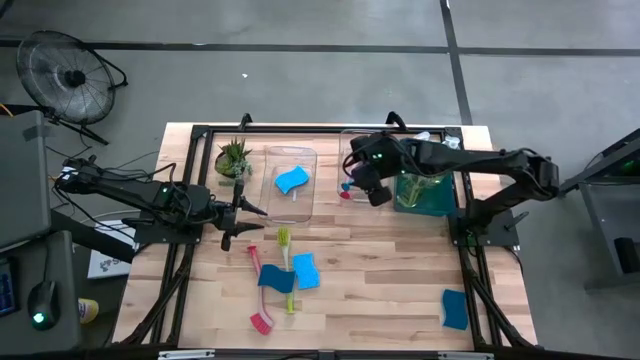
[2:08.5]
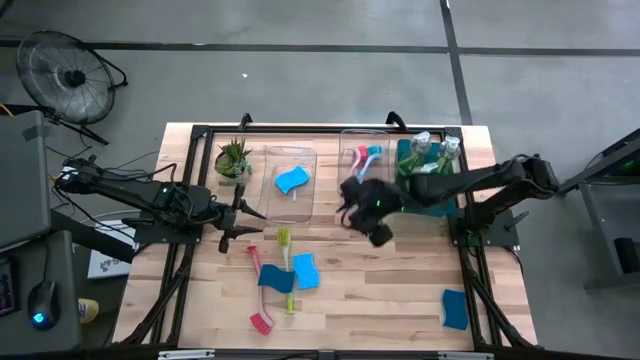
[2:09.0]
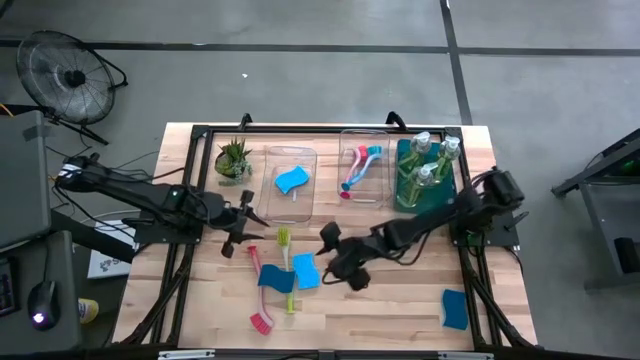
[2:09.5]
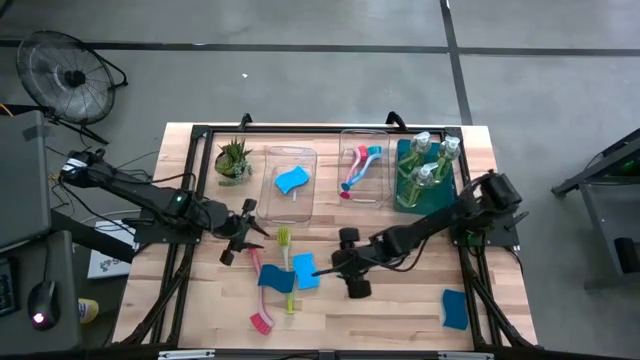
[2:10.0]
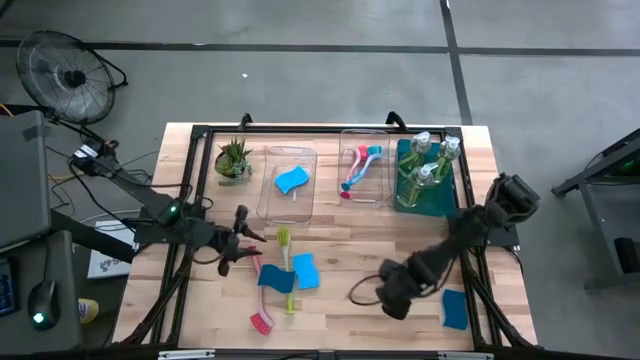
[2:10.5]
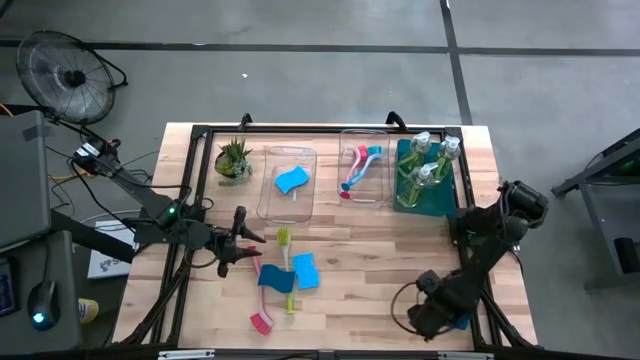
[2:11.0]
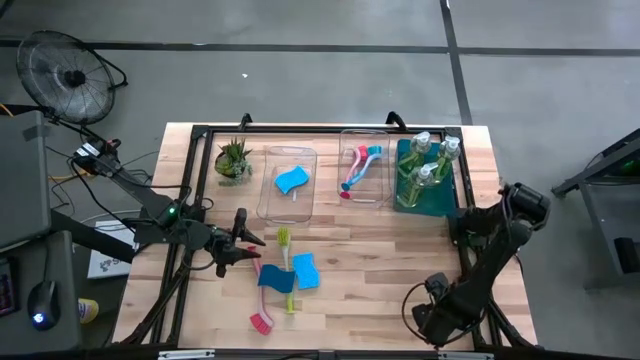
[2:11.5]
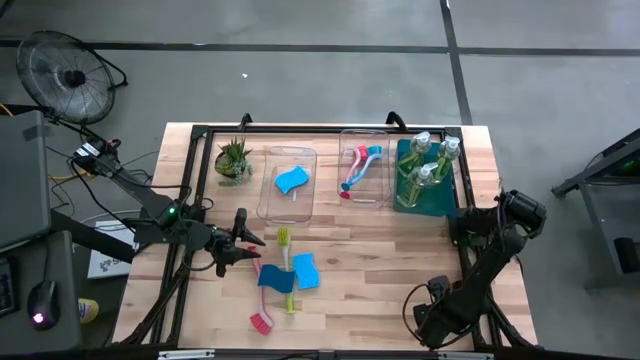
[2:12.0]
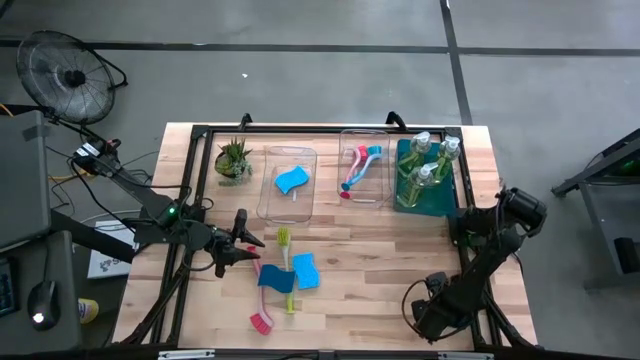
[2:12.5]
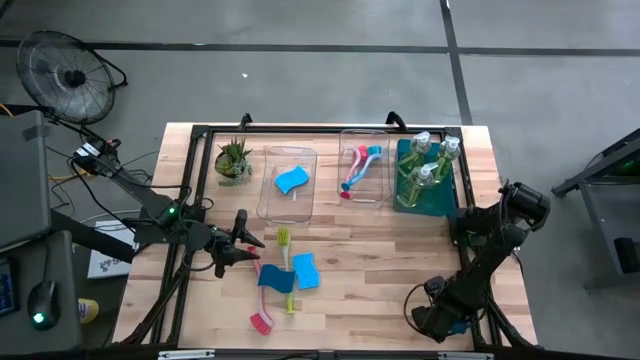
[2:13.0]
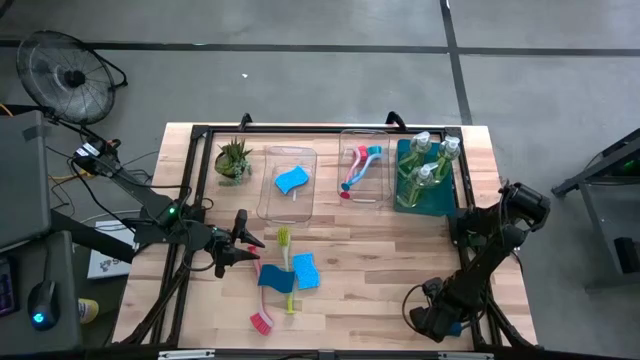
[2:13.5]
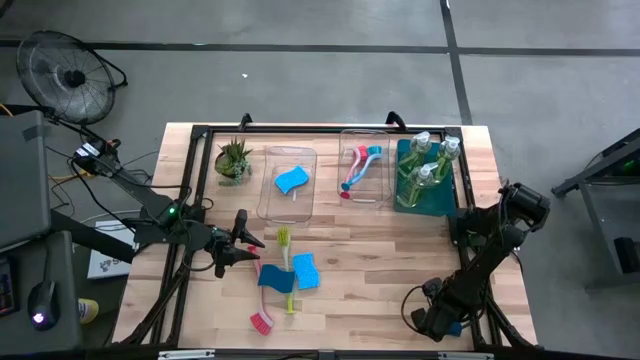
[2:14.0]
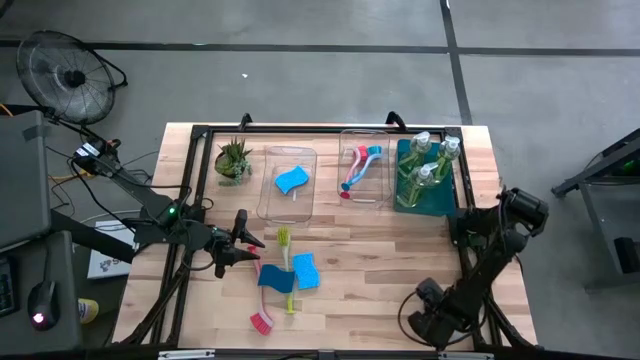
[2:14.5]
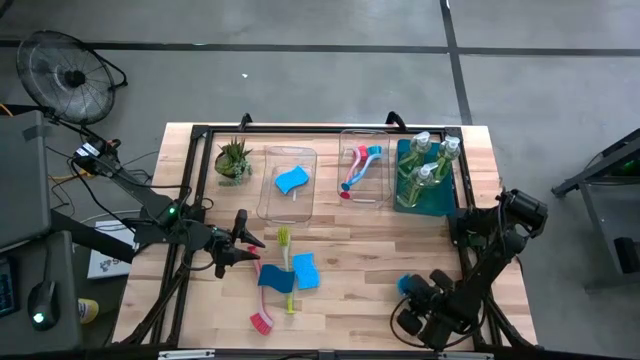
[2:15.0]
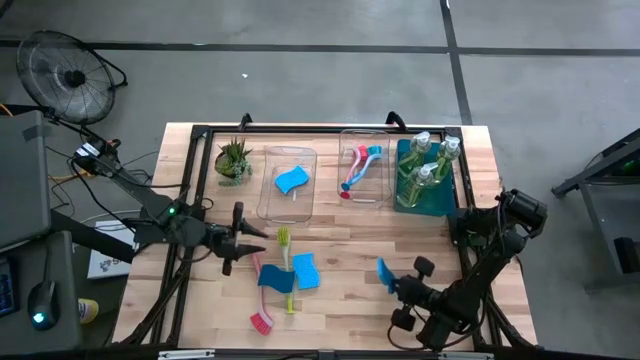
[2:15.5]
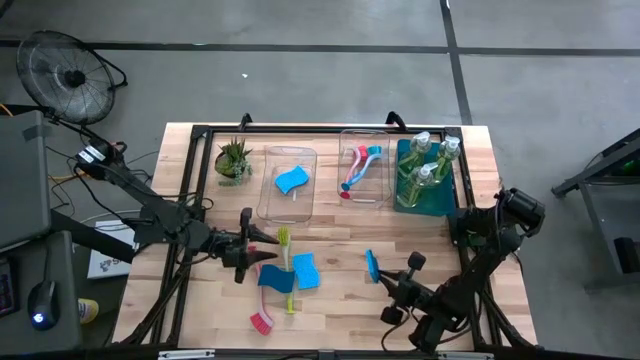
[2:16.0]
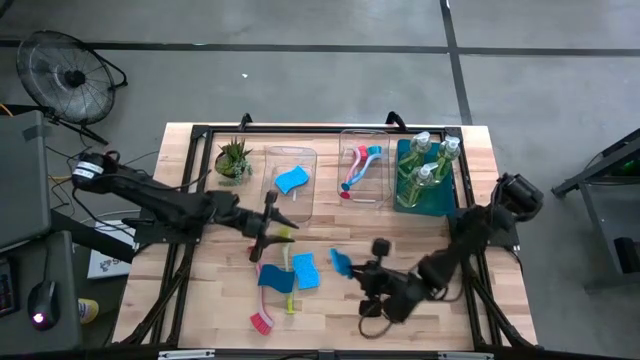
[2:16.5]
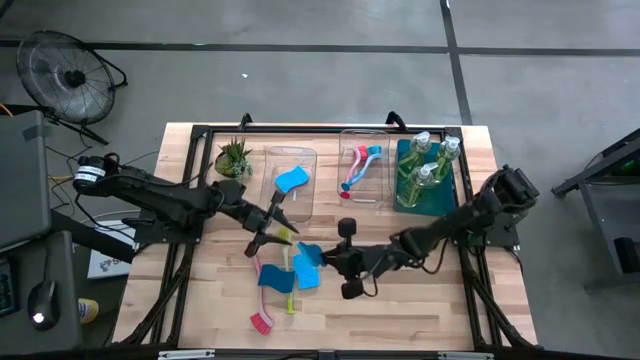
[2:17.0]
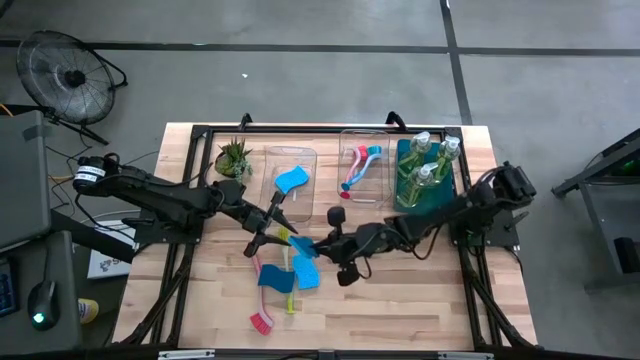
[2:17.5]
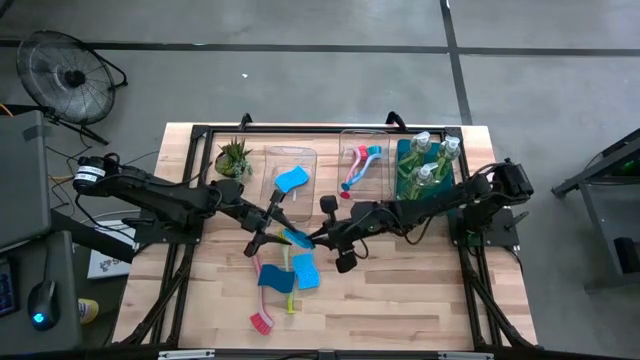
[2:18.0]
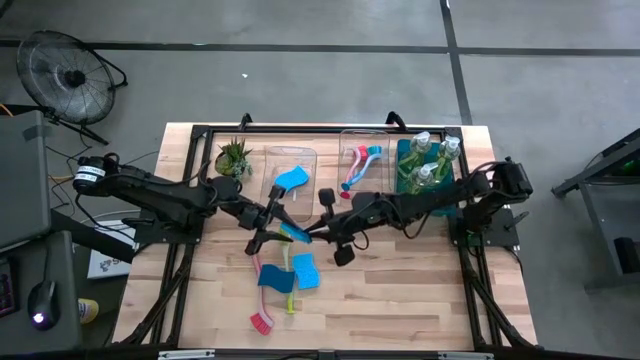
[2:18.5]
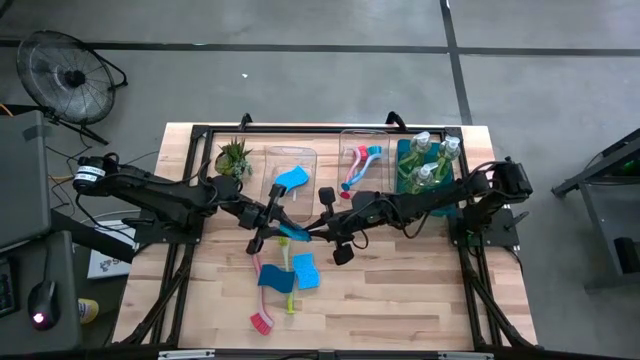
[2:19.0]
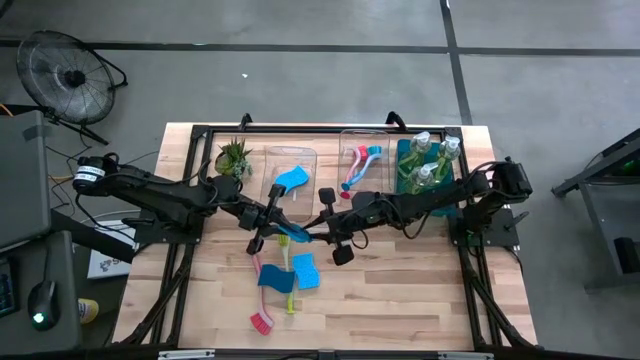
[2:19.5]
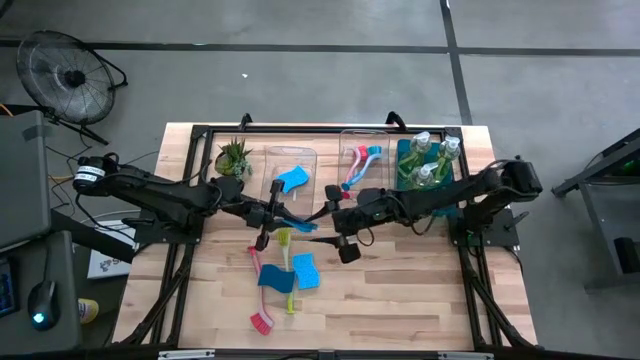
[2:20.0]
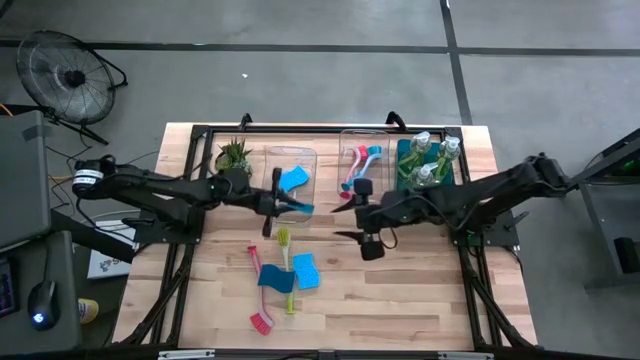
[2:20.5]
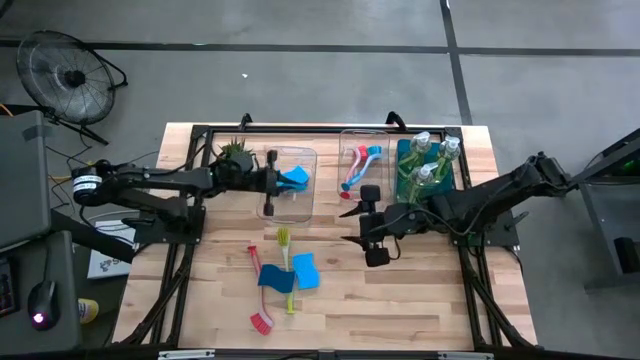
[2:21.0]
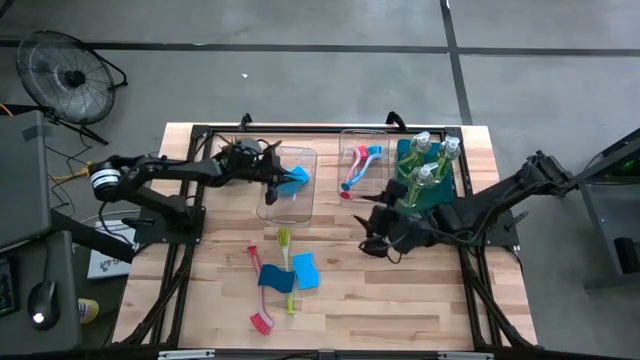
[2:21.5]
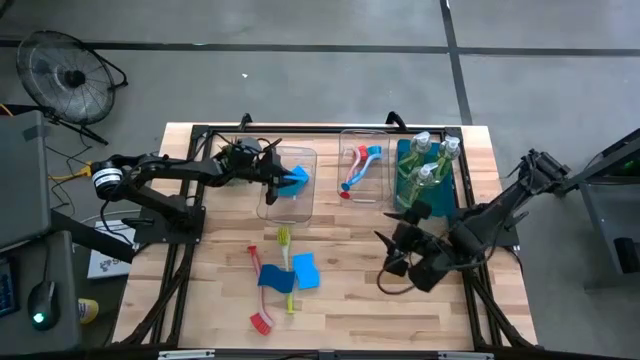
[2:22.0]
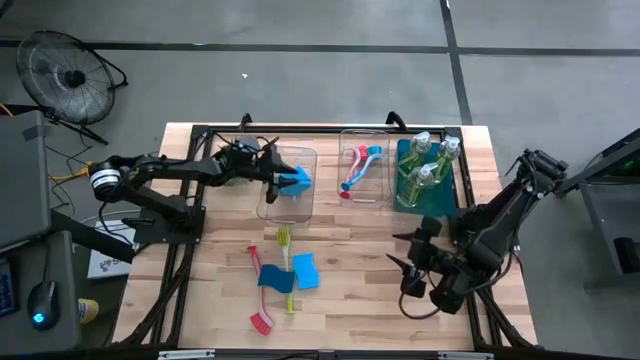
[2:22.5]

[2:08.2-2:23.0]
Task: Pick & Place Kitchen Sink Supplies
Put the bottom blue dishwashing sponge into the left transparent bin

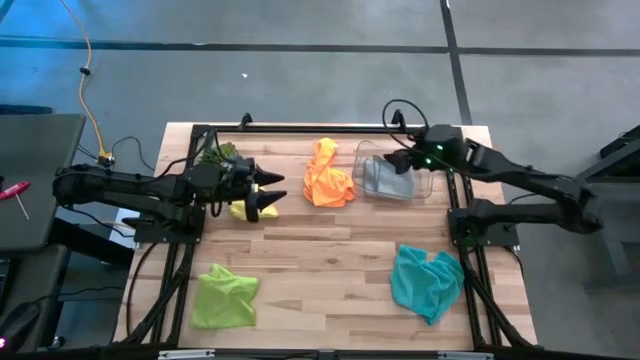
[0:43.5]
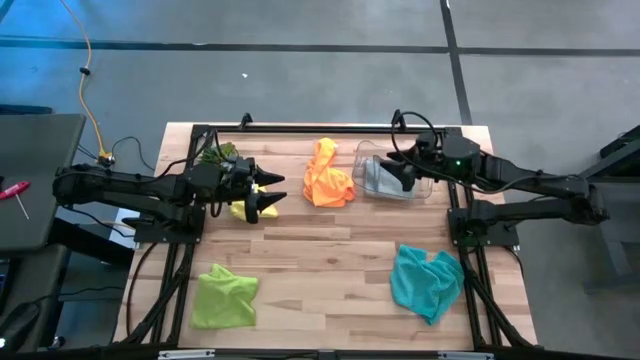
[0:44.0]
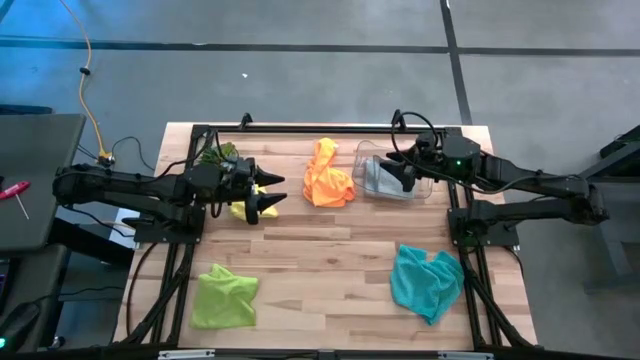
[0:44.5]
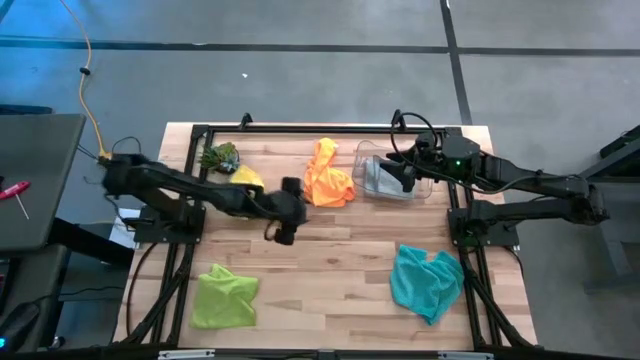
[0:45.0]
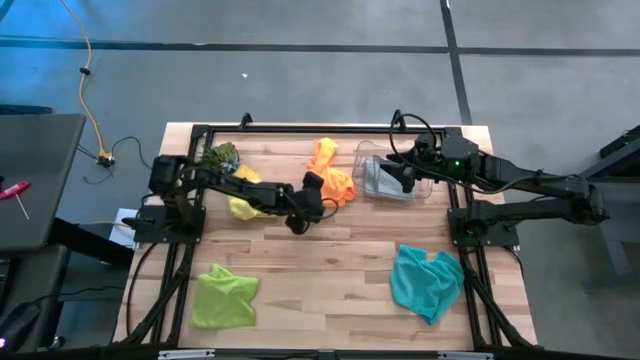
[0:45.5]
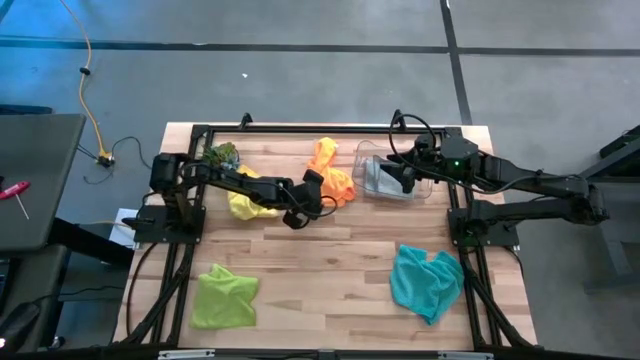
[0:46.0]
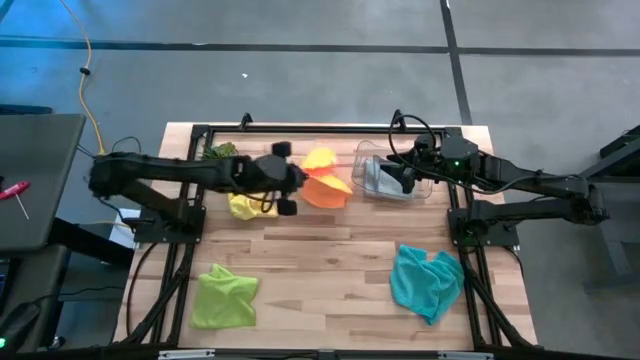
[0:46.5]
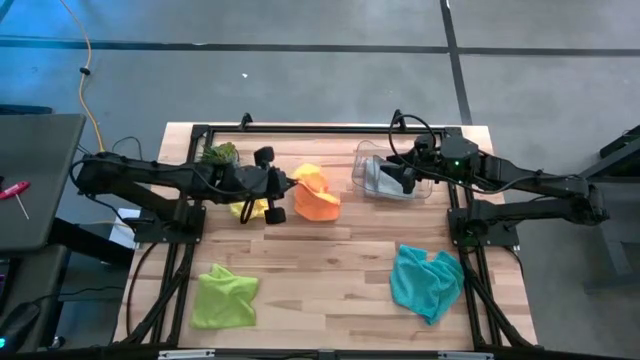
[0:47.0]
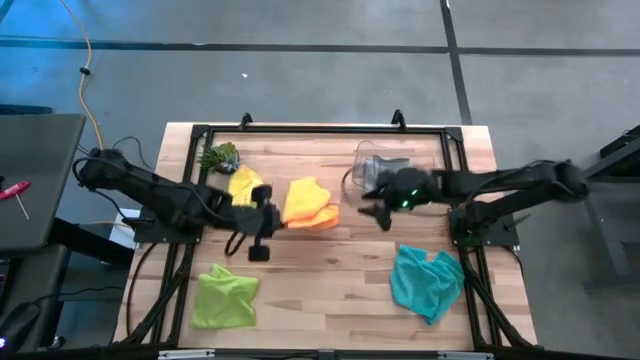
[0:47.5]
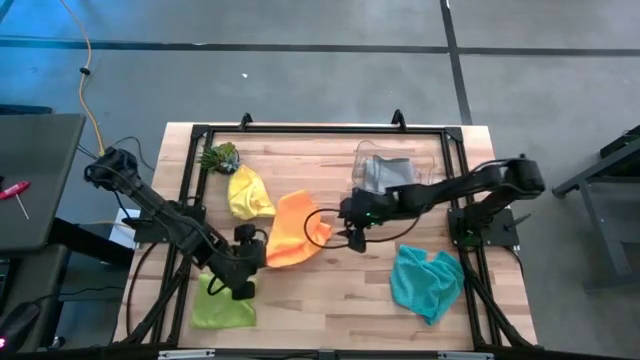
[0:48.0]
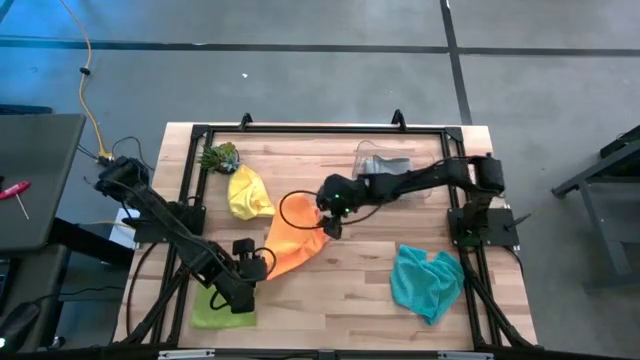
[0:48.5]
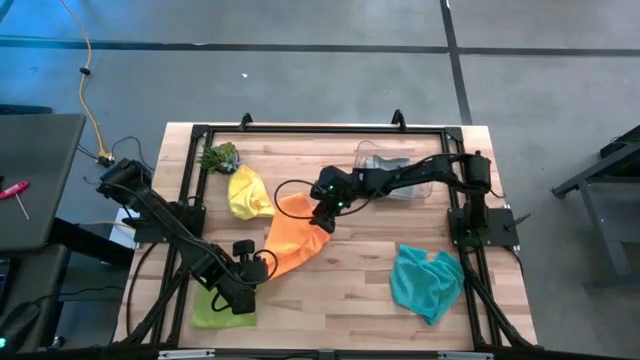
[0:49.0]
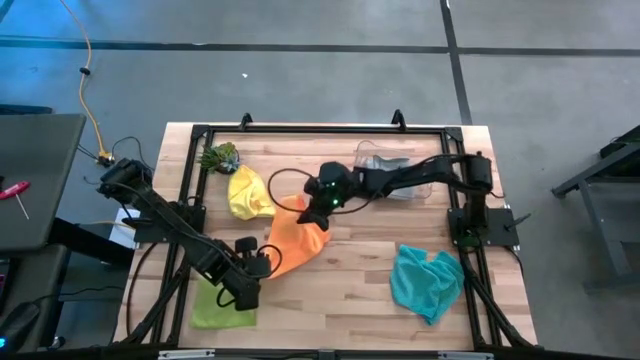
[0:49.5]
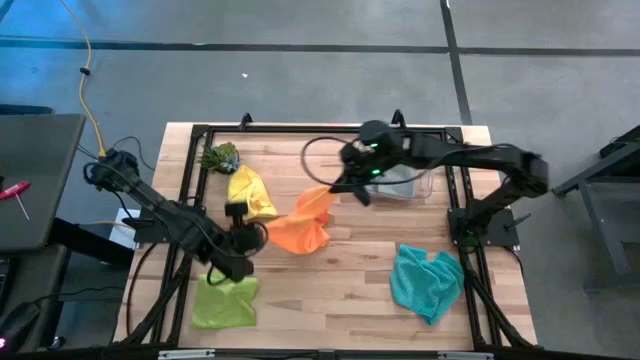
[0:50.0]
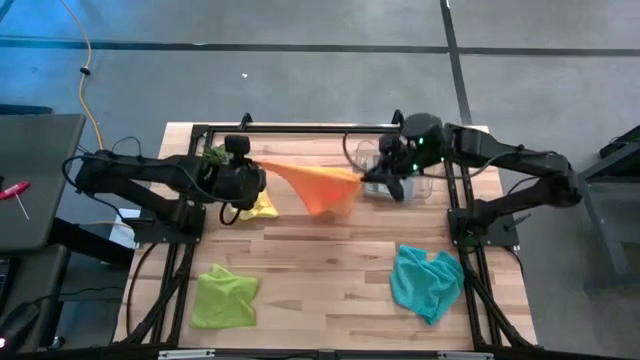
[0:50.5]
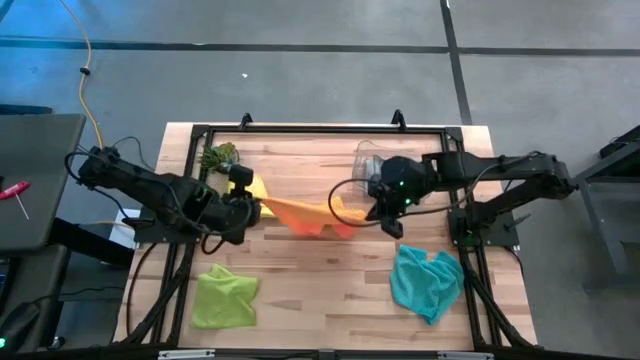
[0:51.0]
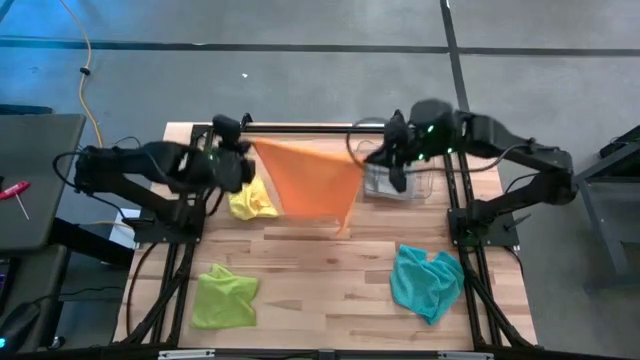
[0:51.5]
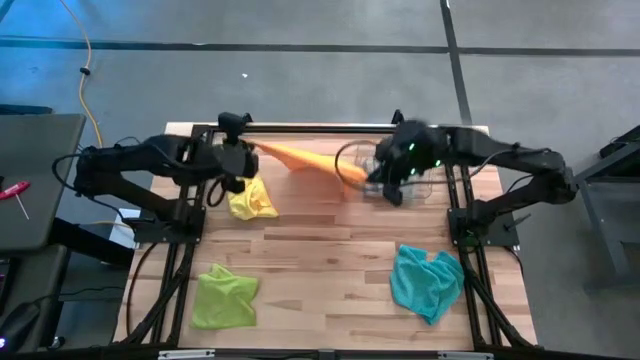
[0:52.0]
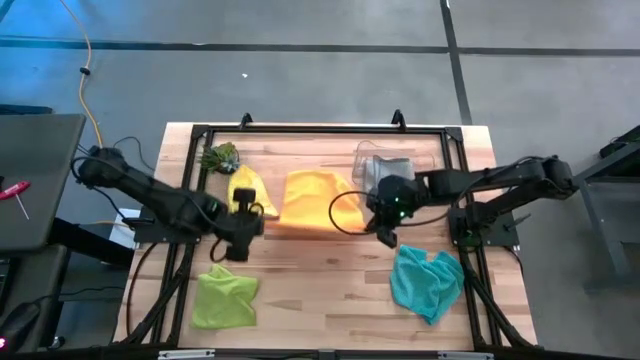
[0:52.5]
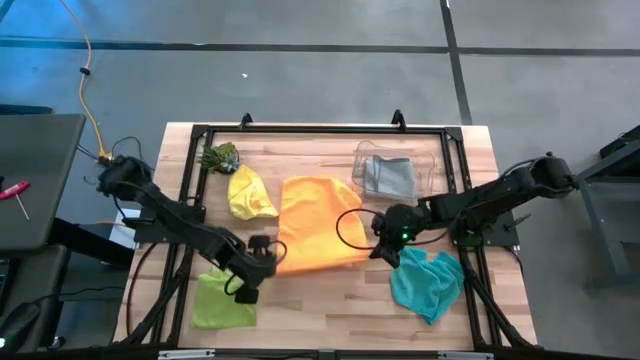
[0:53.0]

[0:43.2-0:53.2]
Task: Fold microfiber towels
Fold the orange microfiber towel
